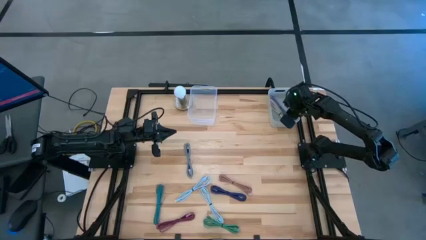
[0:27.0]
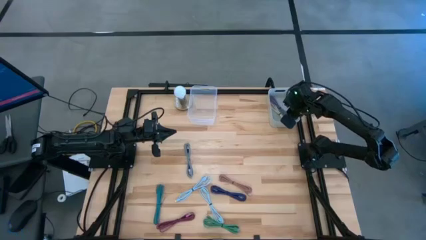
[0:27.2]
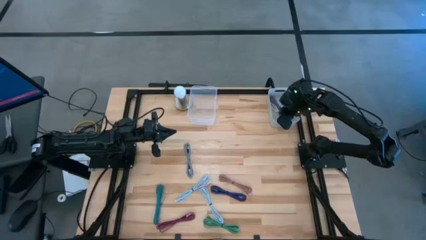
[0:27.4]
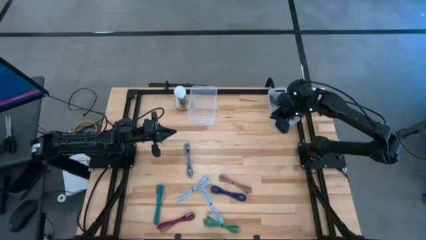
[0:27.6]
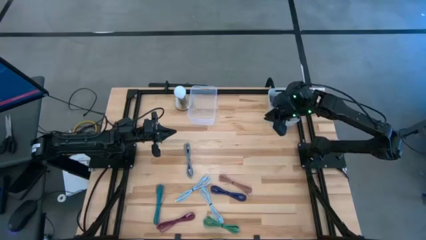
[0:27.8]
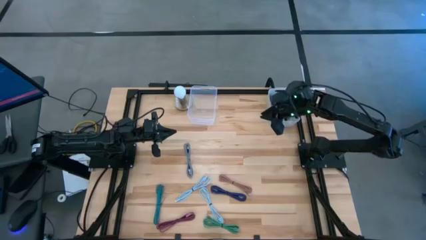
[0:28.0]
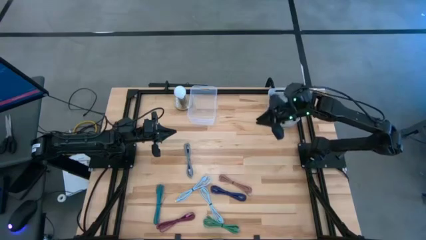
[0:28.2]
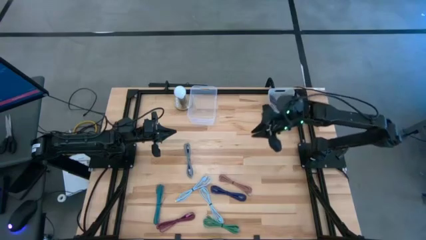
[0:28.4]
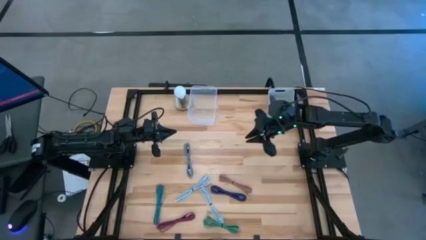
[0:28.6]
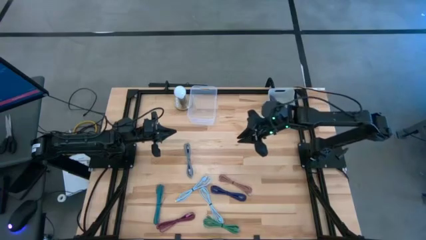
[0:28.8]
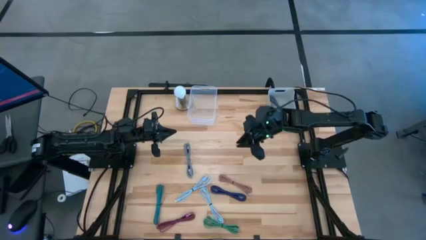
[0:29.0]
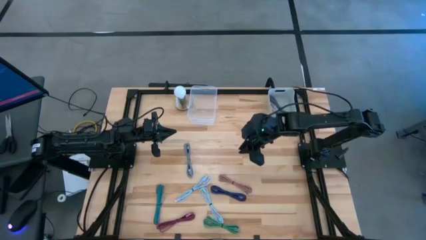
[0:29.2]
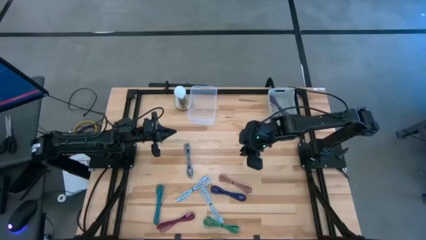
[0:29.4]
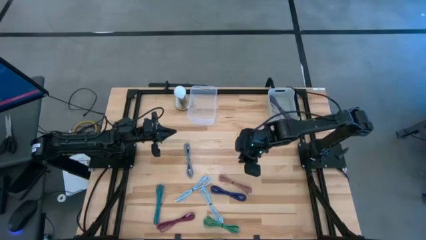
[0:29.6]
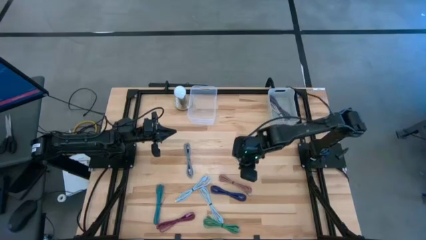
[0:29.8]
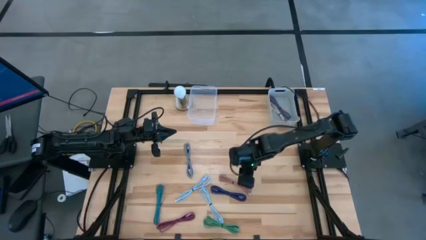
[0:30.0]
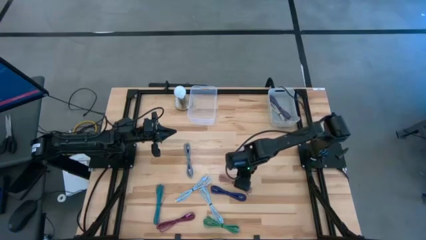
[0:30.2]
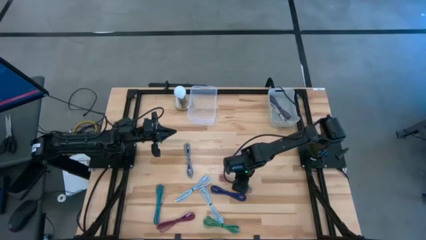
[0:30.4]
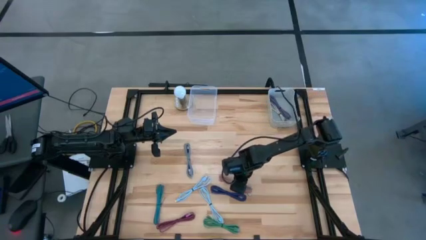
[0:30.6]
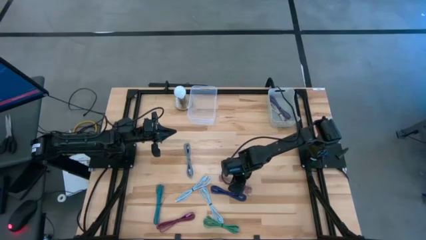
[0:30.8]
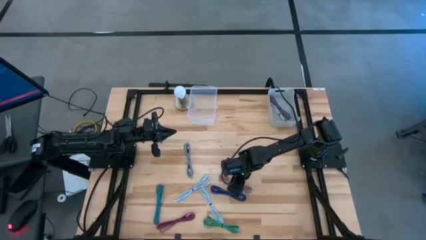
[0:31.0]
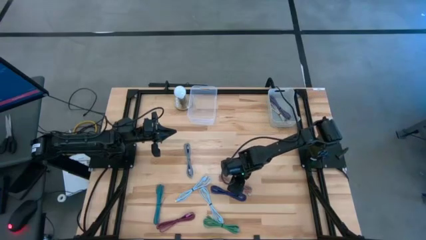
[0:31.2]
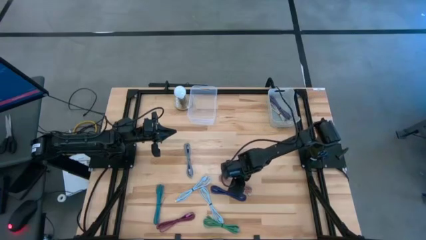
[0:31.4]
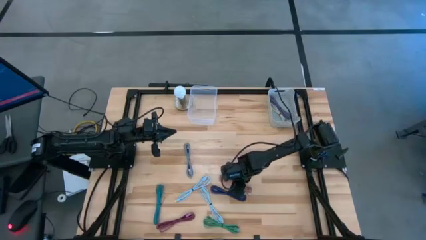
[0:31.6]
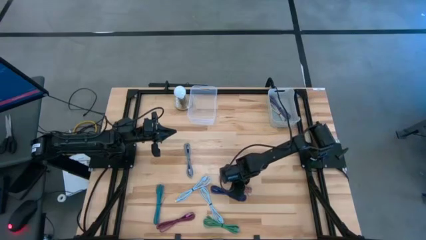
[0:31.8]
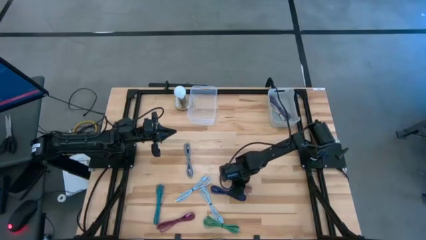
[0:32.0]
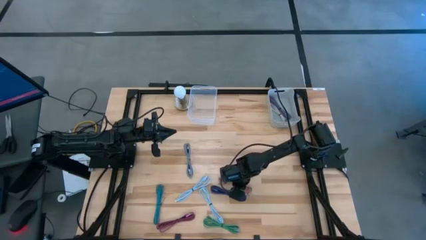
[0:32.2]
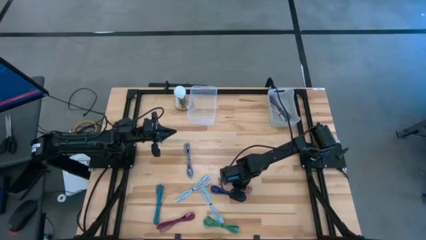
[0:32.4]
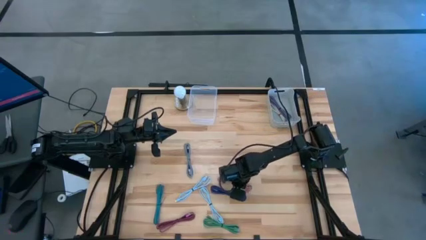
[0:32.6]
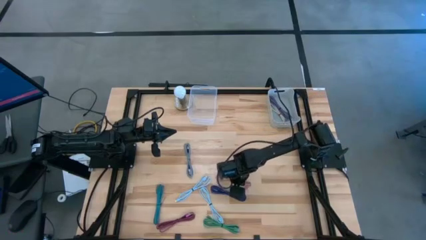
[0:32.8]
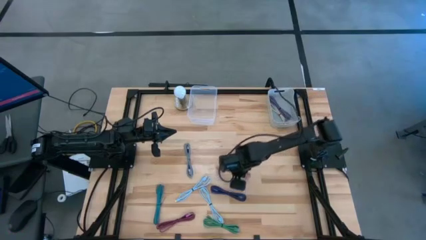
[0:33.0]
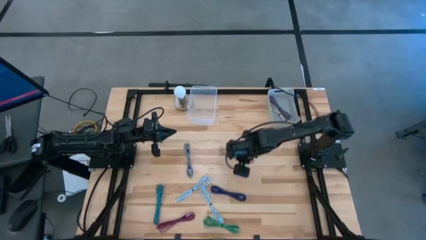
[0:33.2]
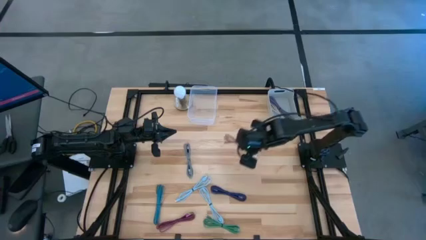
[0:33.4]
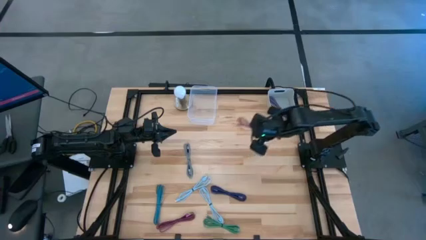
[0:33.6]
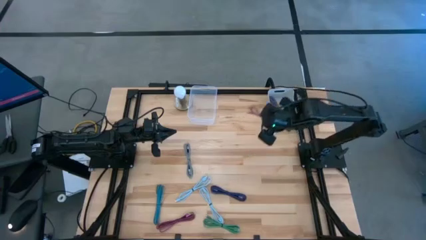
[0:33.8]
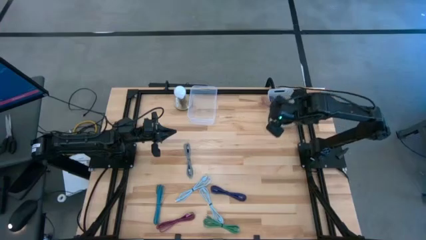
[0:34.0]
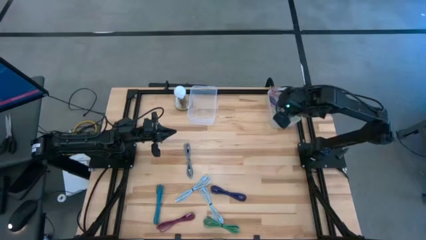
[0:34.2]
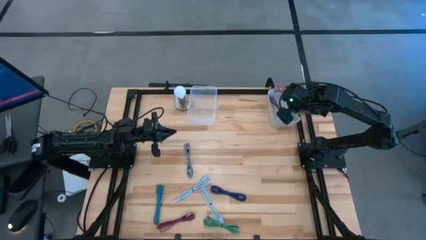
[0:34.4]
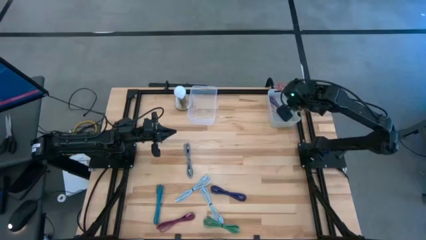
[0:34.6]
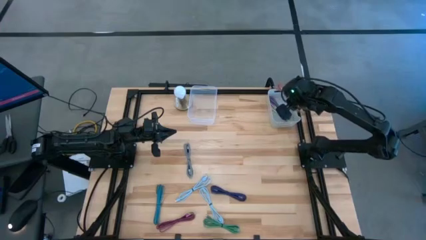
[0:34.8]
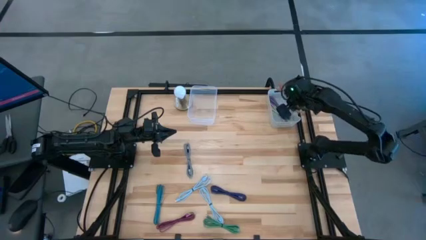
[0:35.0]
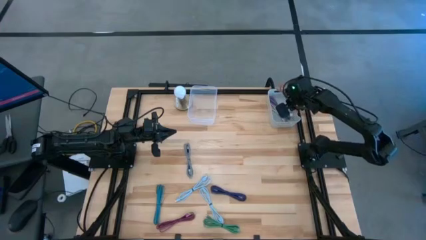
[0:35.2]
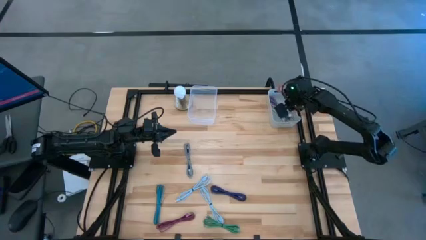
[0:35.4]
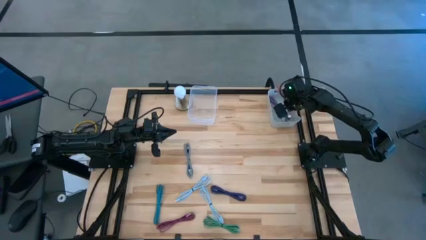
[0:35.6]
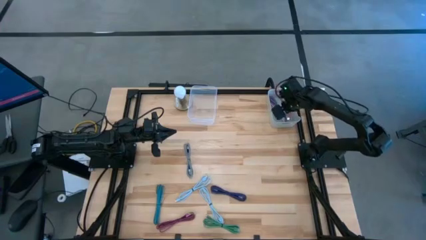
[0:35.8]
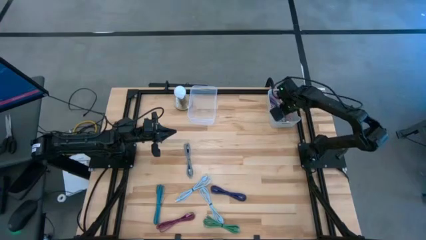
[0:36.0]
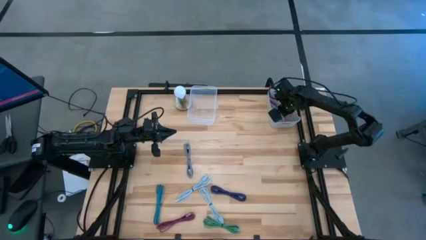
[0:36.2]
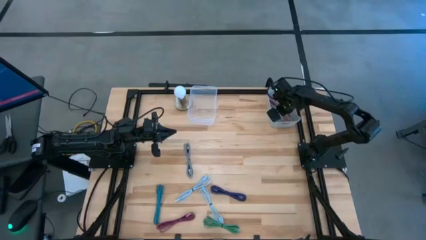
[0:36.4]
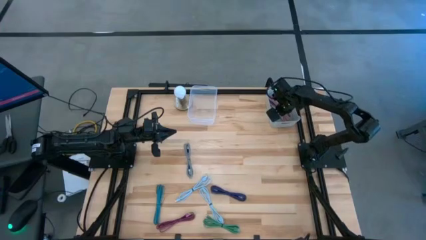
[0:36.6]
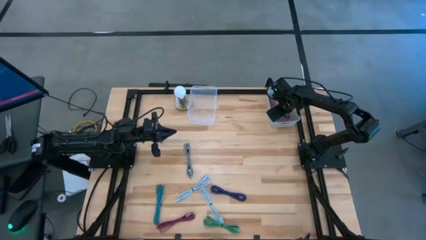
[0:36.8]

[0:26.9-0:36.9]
Task: Pick & Place USB Port
Put the pink charger cable into the white bin

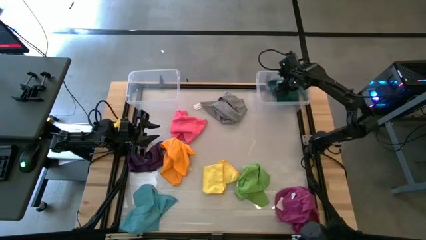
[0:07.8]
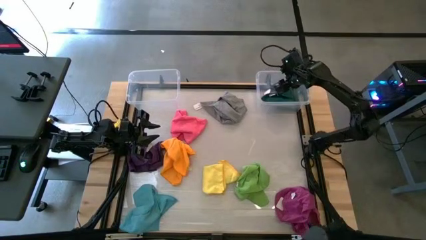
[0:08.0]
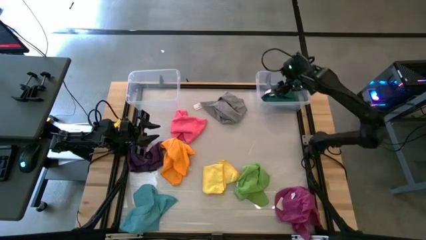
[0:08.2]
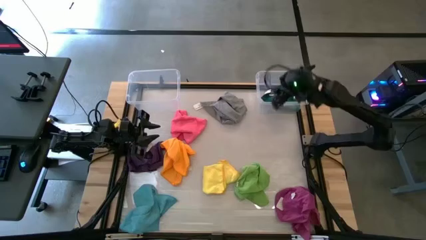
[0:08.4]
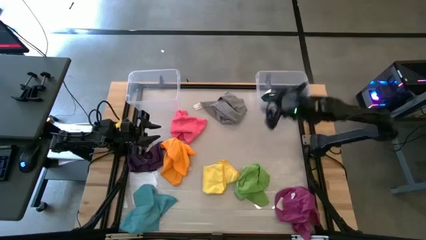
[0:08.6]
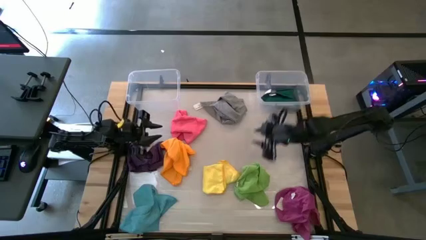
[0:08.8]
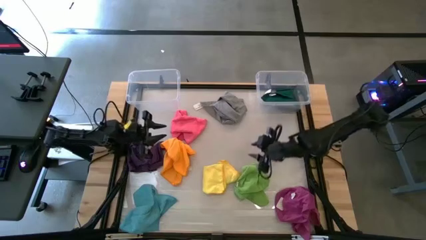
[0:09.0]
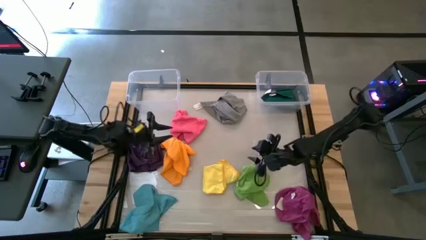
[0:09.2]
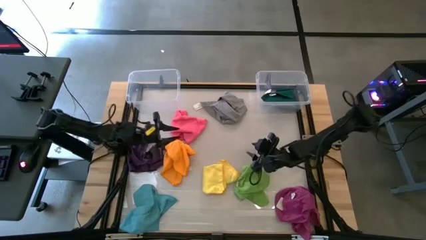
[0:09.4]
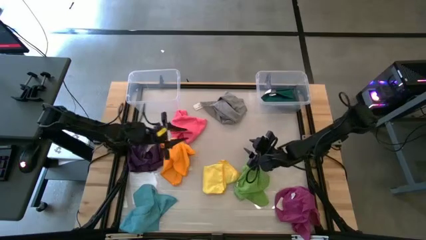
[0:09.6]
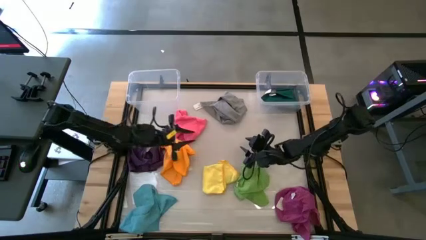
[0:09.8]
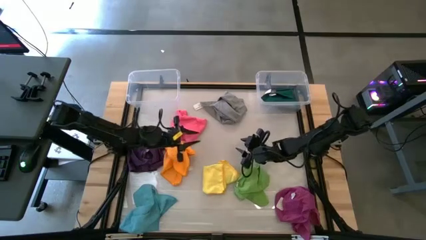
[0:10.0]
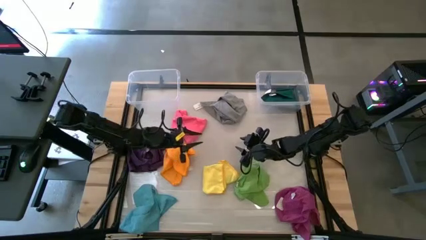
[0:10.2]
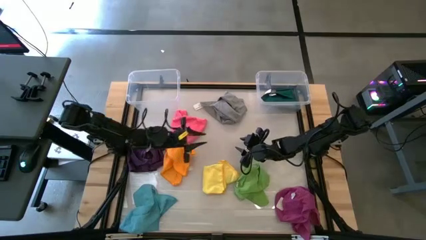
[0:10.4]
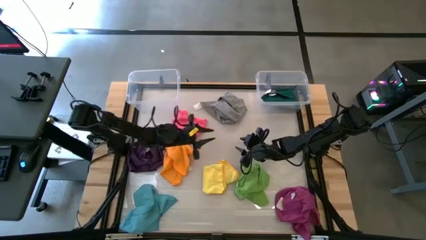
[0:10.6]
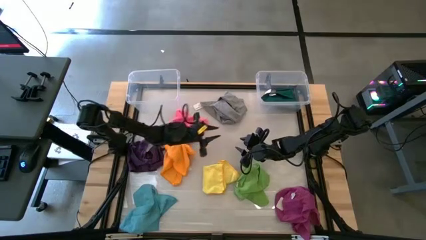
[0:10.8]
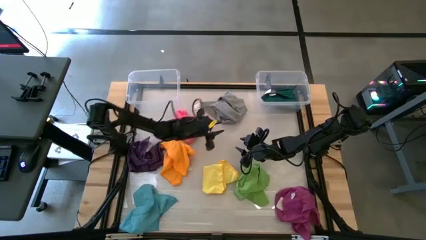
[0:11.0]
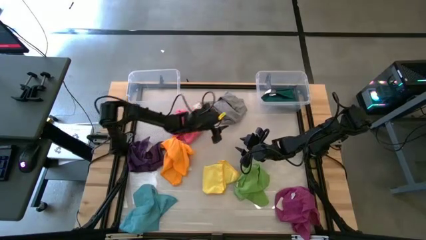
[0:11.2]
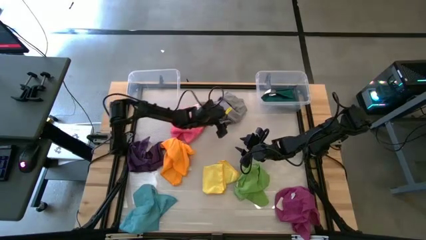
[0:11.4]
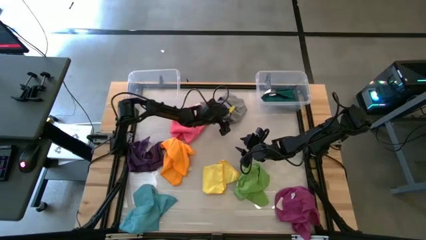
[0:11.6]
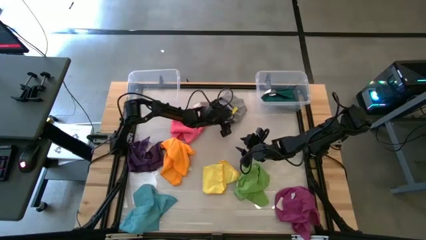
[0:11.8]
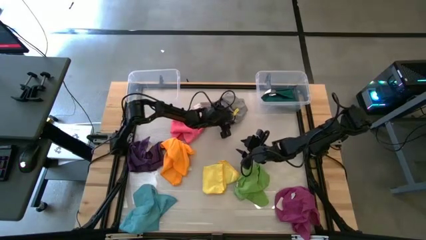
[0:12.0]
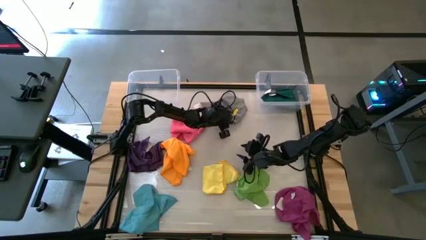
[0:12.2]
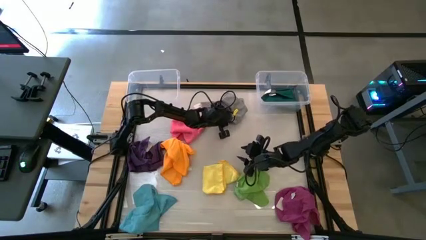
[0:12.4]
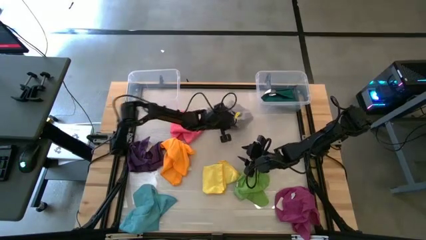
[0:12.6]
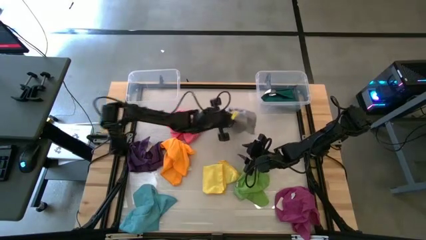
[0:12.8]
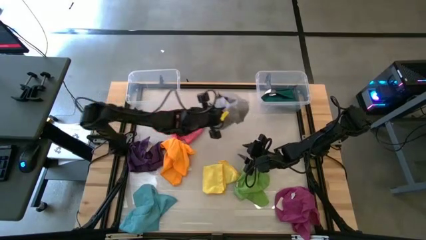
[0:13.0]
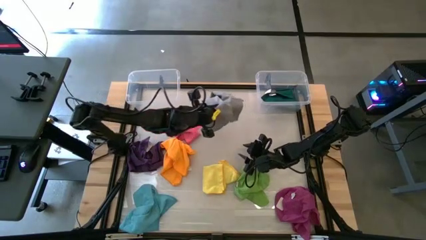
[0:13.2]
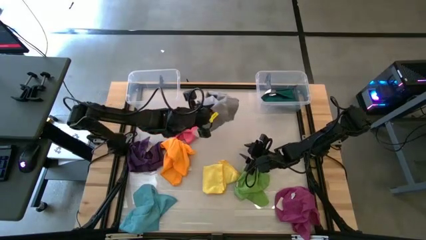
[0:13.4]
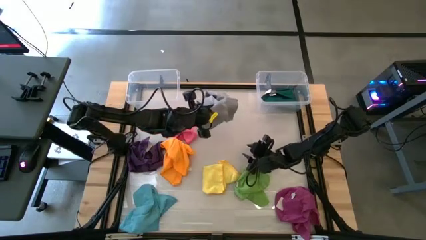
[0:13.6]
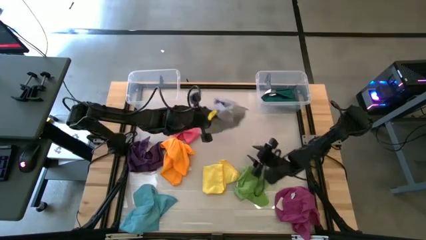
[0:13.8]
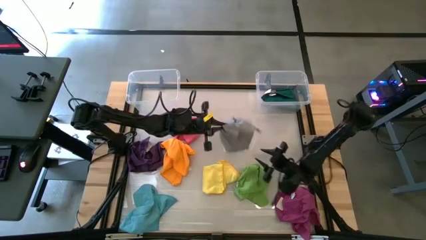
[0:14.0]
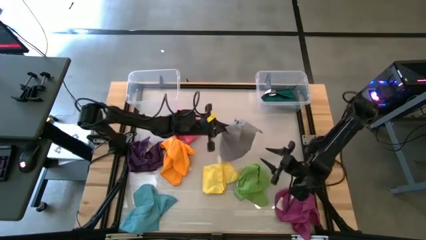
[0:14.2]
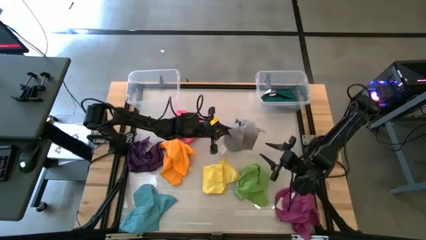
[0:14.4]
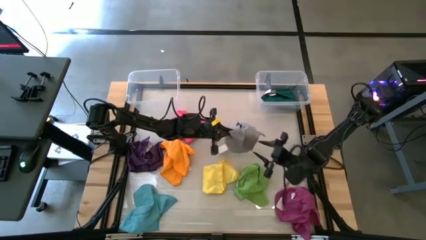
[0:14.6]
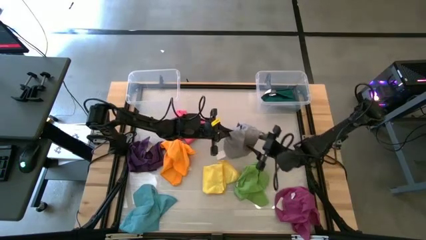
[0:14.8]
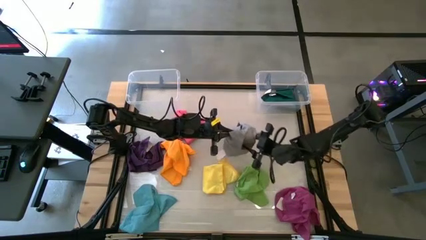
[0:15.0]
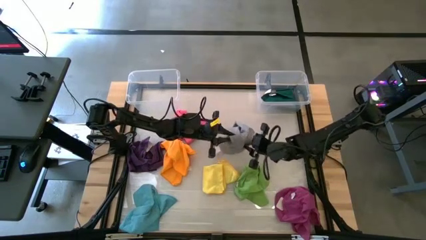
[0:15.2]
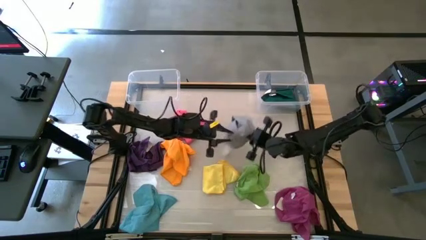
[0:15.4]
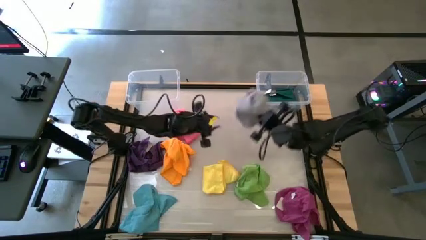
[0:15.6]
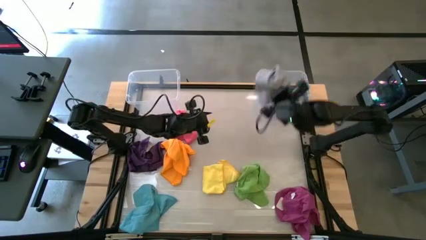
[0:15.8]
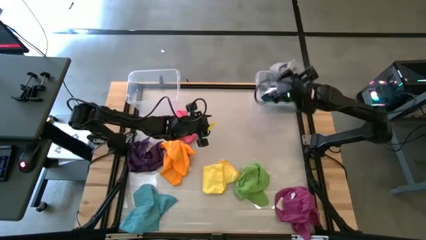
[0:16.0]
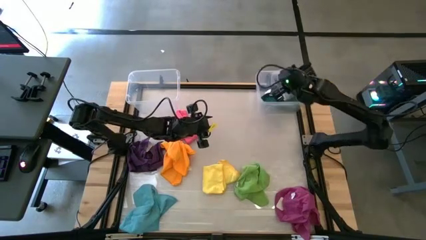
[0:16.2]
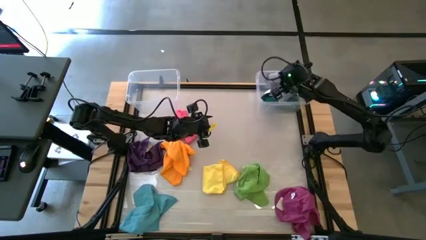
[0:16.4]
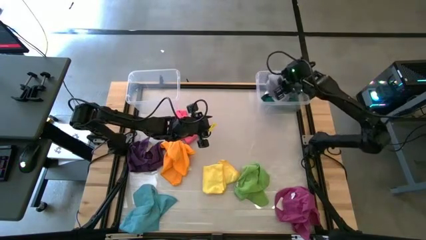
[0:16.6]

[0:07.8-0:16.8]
Task: Sort towels by color in basket
Put the gray kitchen towel into the right transparent bin
